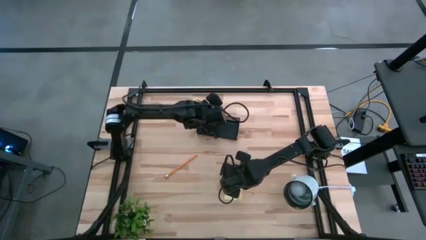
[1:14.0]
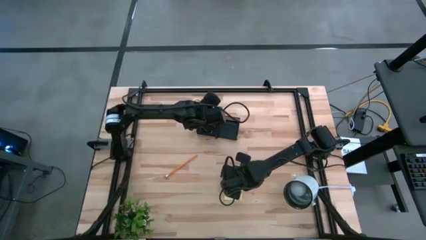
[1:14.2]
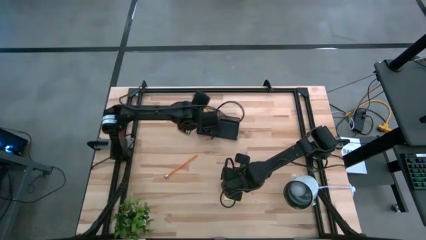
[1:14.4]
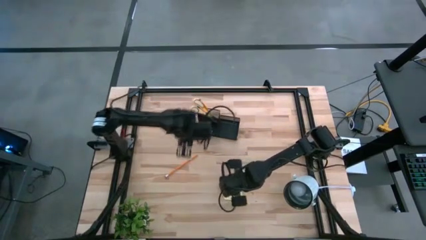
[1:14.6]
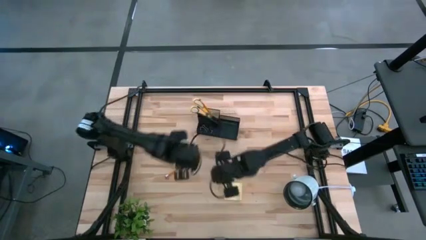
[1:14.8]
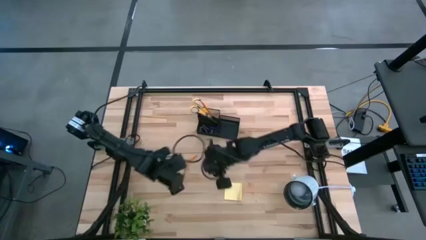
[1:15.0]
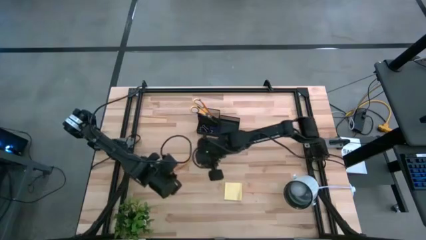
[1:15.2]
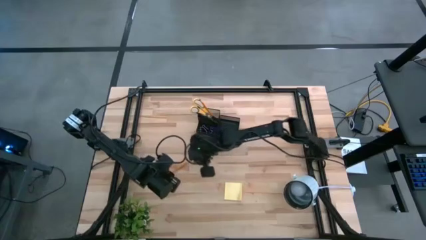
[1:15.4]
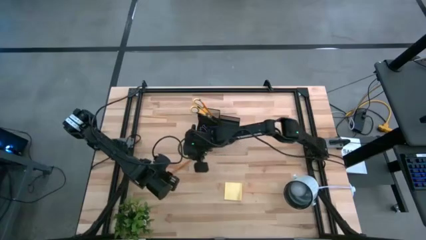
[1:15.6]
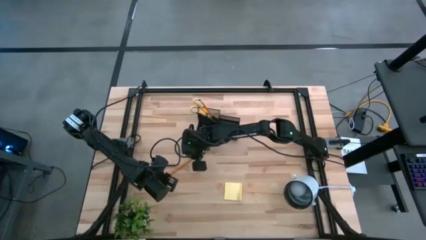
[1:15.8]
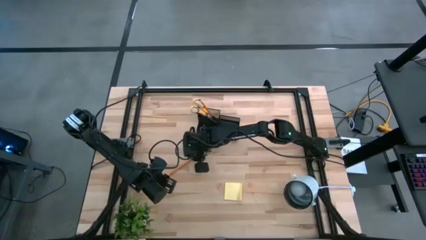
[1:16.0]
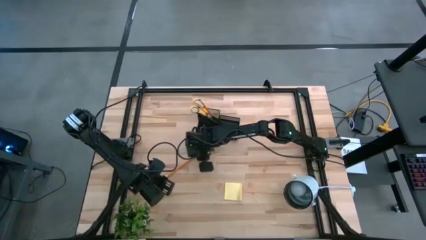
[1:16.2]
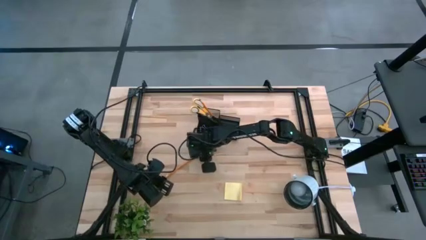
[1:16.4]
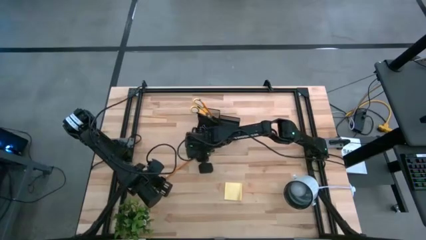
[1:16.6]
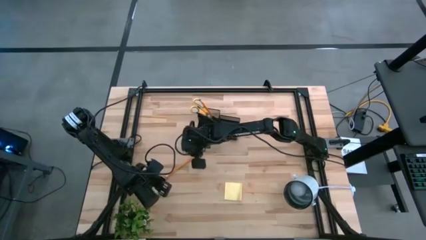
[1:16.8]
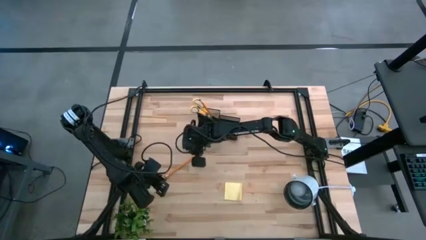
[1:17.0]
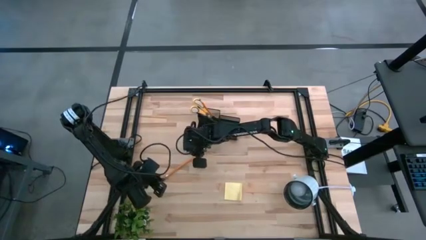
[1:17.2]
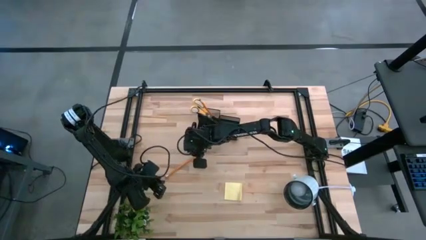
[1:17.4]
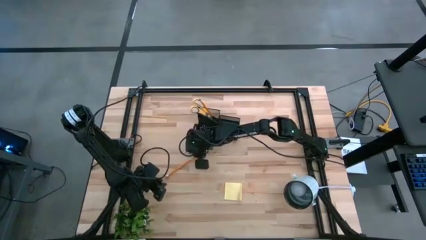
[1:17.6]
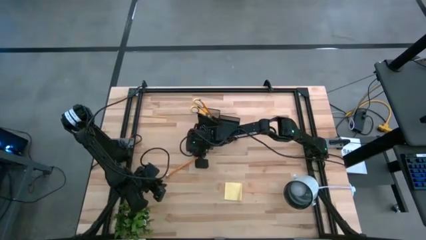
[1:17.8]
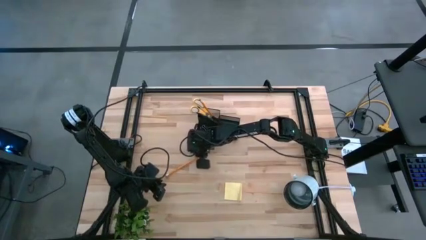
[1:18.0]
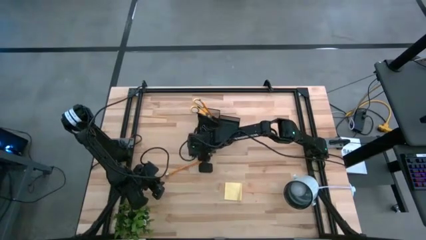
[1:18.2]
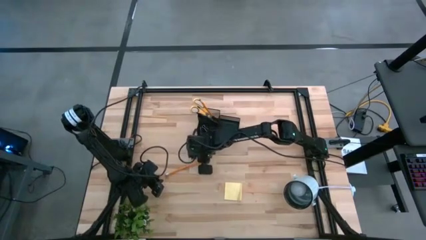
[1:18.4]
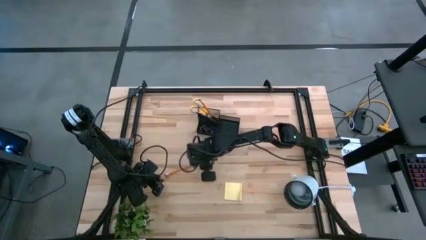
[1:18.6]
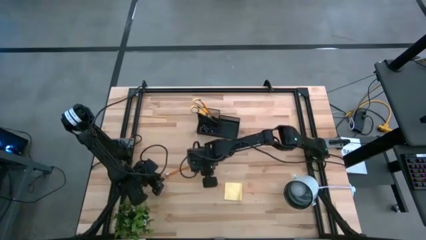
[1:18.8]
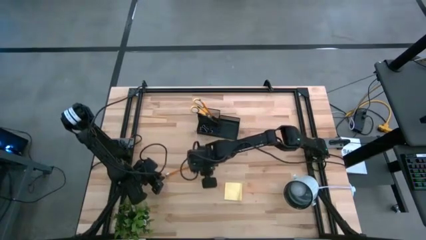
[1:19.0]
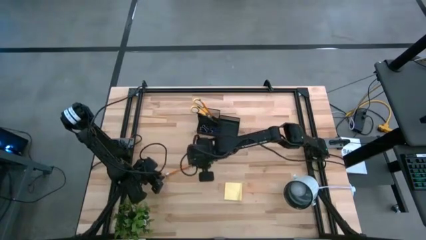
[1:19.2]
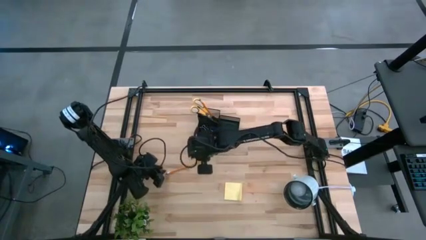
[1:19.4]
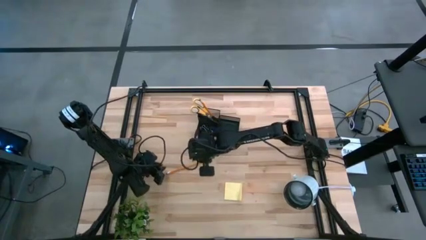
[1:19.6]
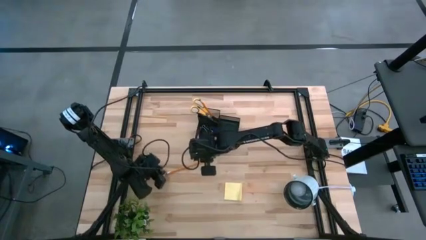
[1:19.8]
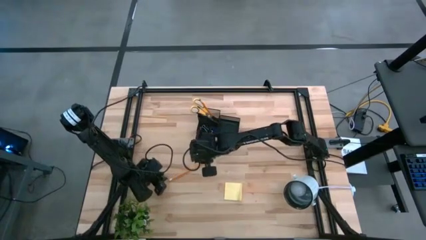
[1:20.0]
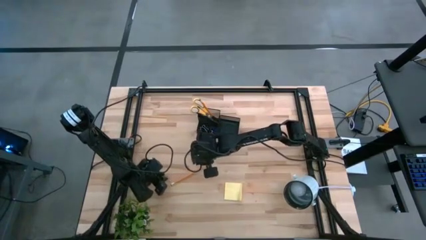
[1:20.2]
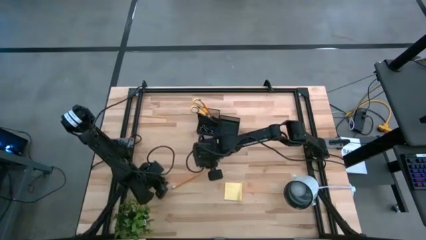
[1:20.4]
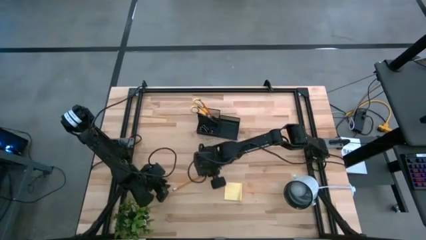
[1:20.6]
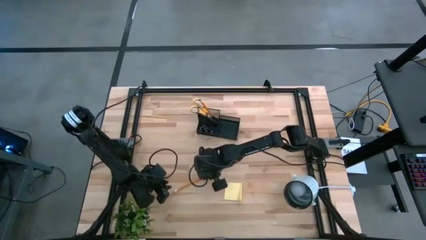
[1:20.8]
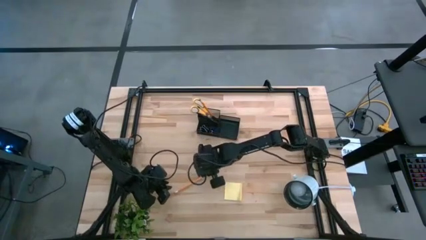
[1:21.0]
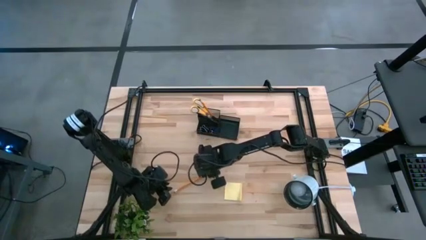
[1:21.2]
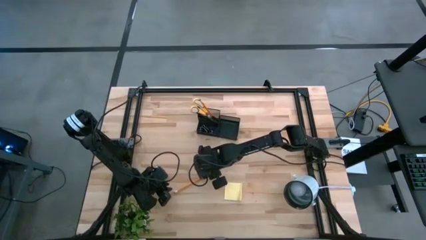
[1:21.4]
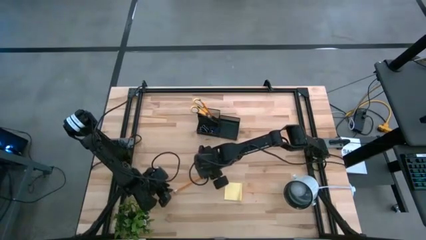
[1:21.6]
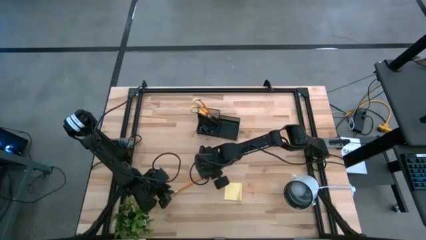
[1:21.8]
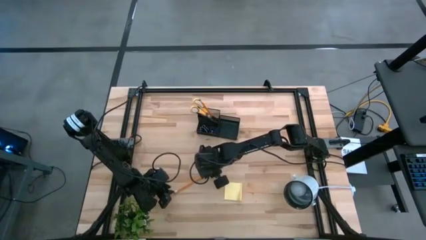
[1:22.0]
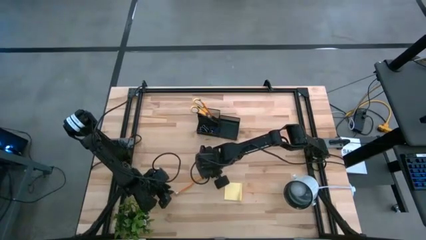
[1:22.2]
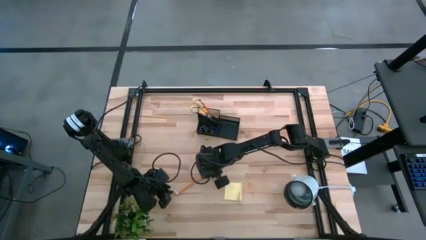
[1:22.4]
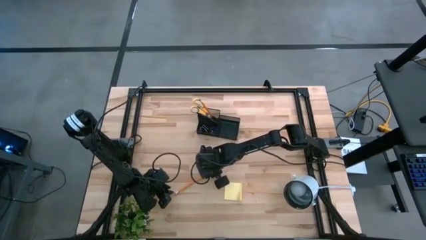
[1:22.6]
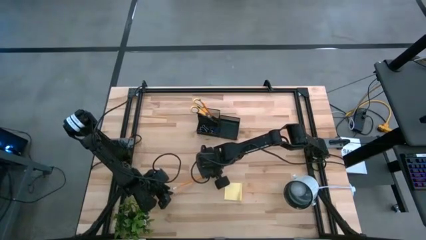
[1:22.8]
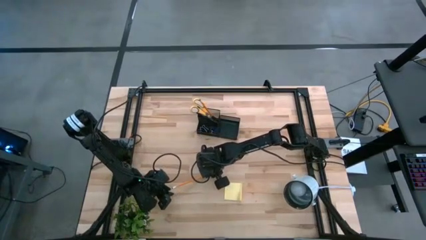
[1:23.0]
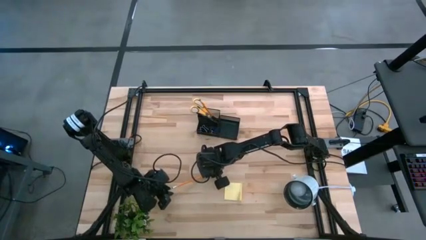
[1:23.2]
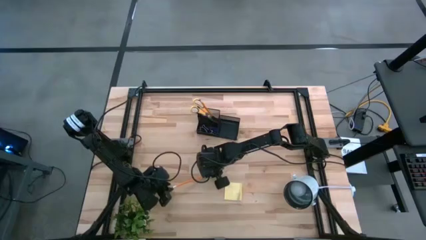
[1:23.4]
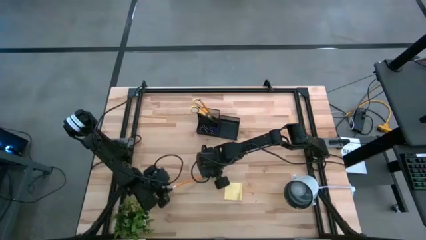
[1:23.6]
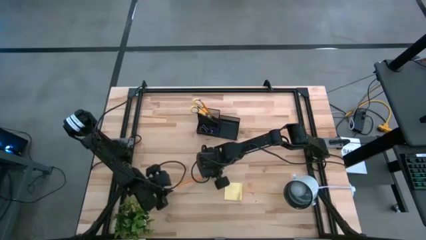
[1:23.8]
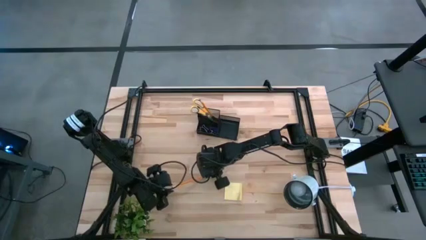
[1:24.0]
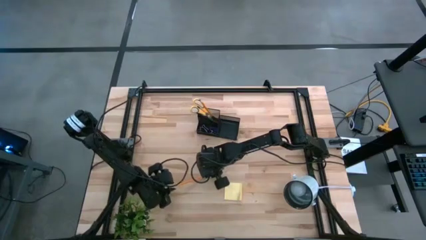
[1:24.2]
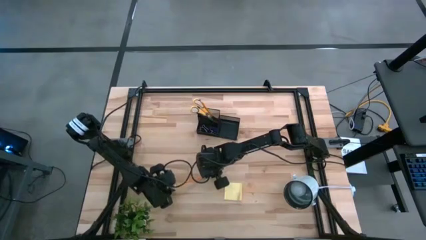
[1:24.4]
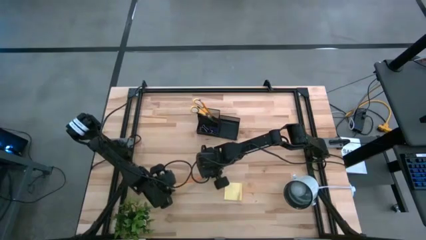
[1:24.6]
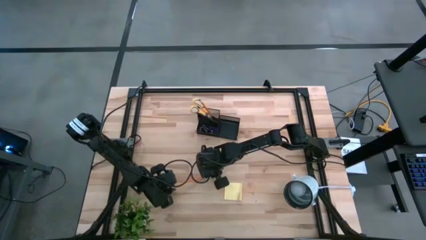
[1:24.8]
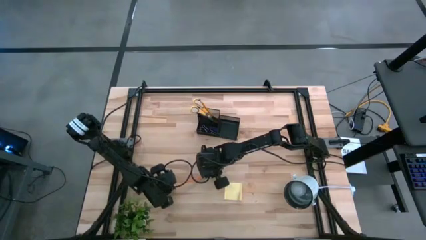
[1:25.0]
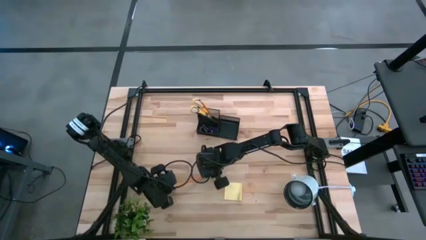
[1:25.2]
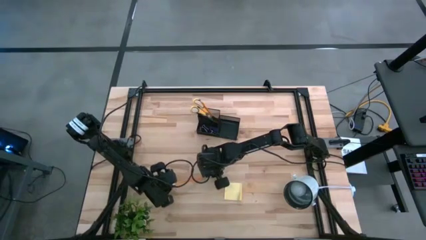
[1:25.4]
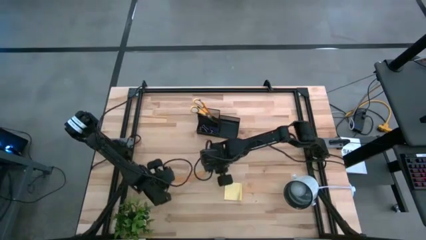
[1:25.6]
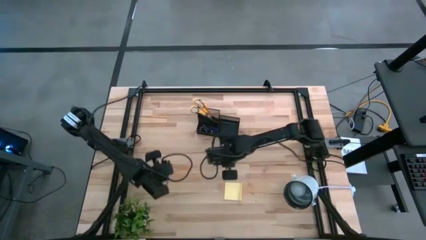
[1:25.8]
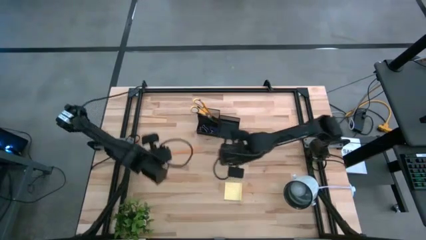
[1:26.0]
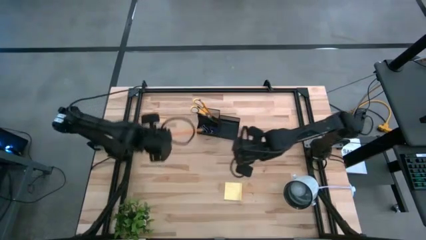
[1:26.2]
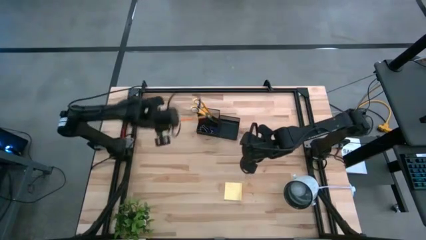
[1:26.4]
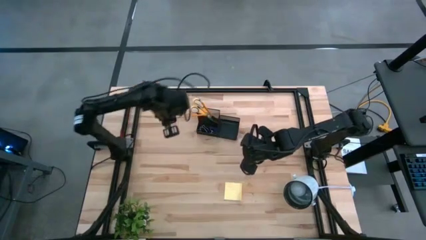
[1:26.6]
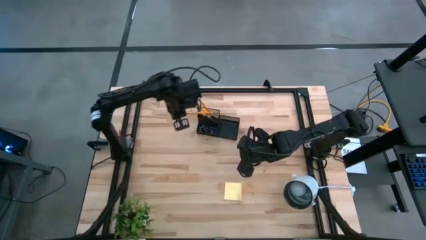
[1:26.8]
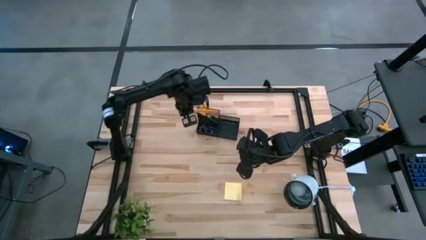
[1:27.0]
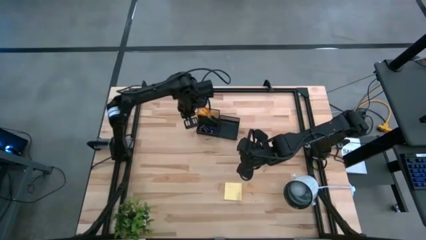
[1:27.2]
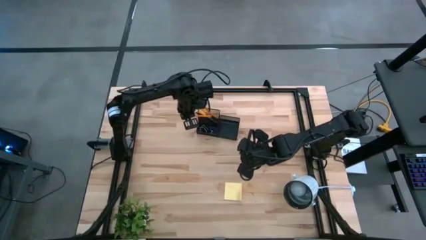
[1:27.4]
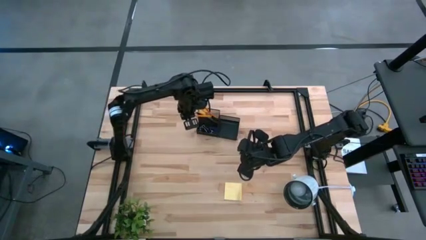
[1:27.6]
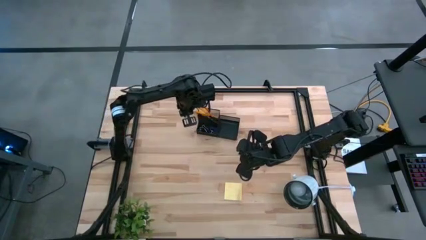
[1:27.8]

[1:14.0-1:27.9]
Task: Pick and place office supplies into organizer
Put the orange pencil into the black organizer bin
